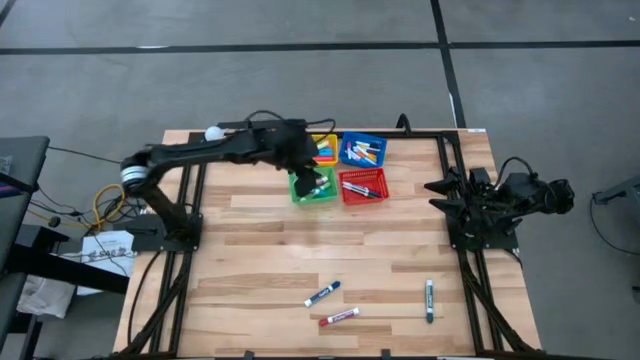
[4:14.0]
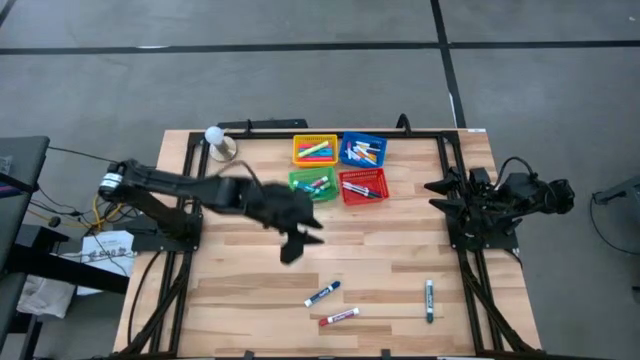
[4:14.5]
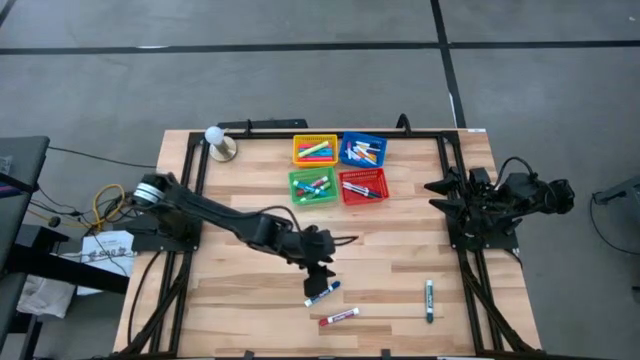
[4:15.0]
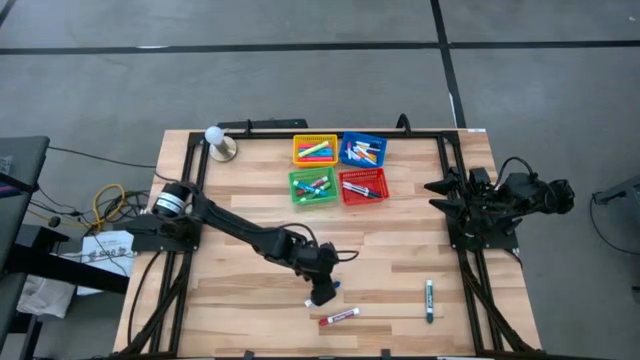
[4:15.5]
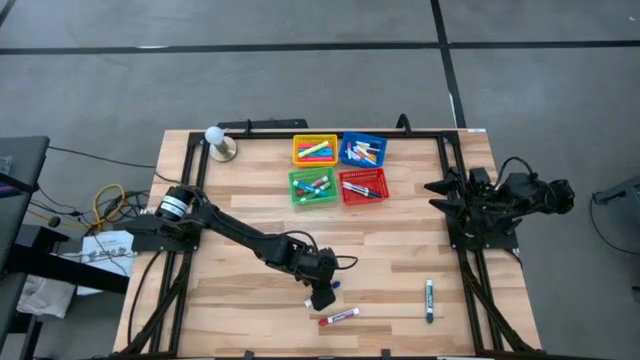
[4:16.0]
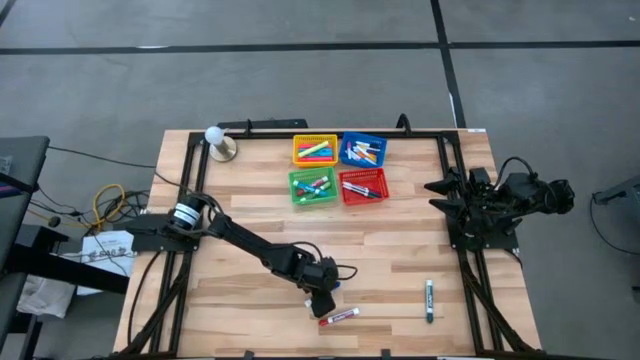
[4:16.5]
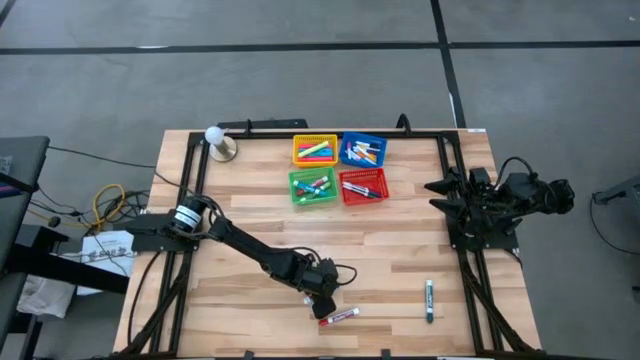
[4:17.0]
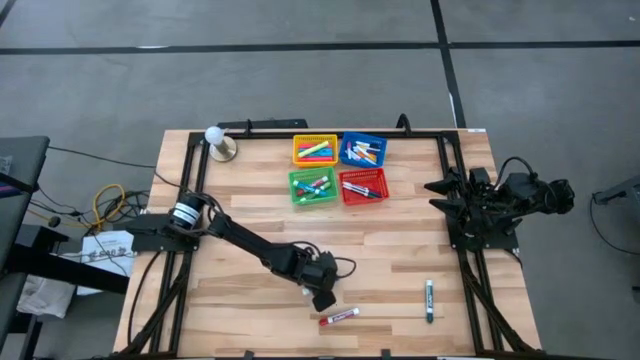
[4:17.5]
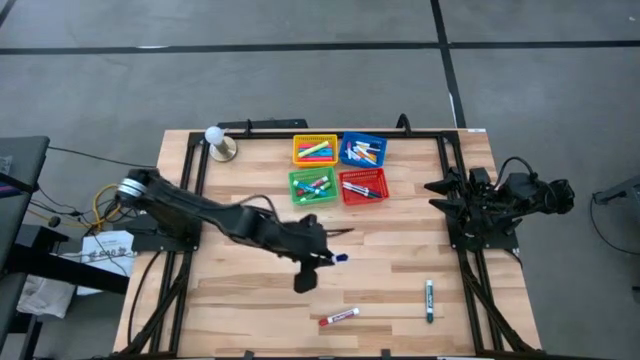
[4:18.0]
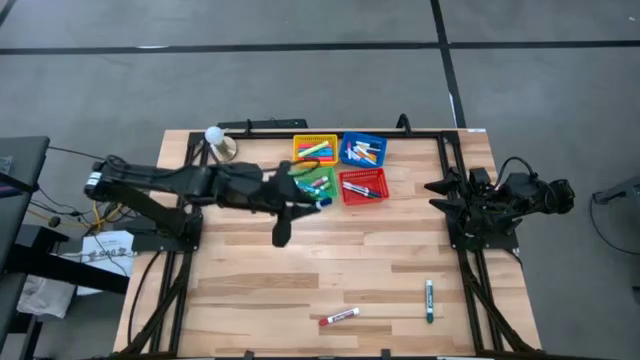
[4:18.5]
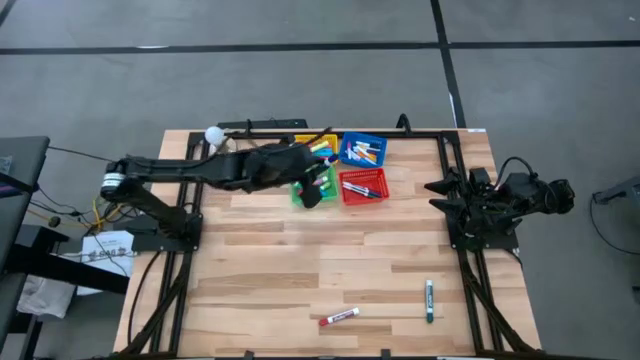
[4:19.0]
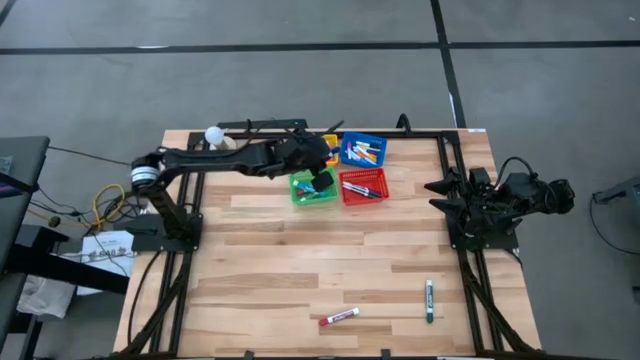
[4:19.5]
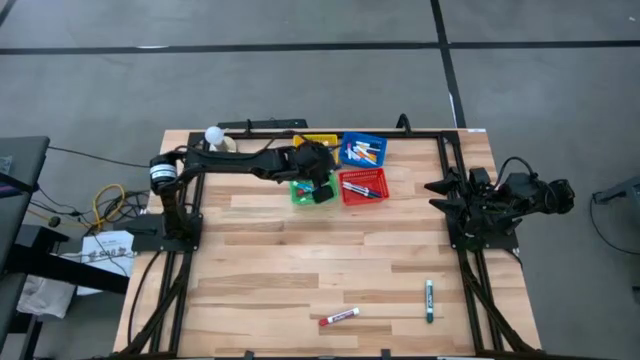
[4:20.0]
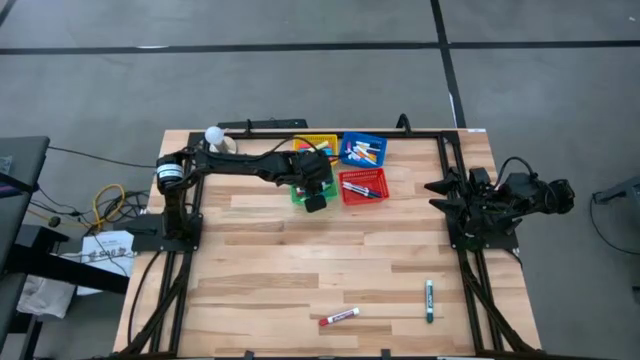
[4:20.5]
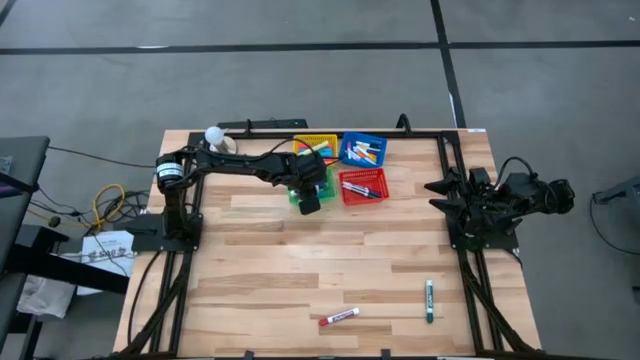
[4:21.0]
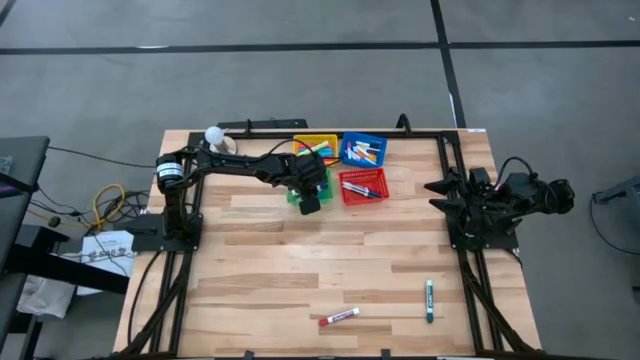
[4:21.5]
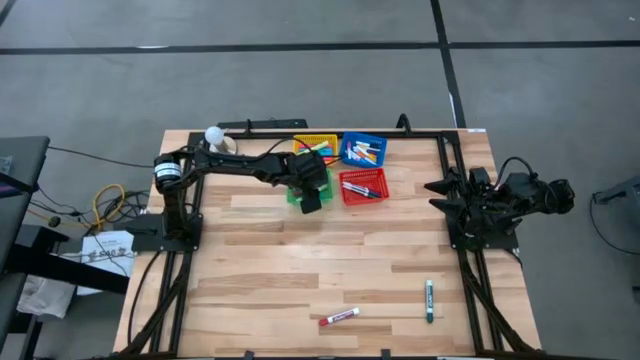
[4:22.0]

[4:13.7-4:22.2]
Task: Pick & Place Markers
Put the dark blue dry erase marker into the green bin

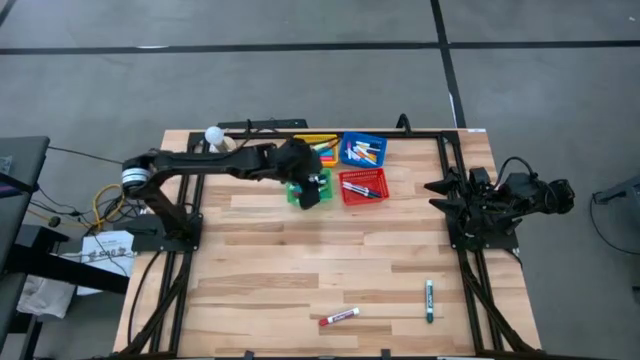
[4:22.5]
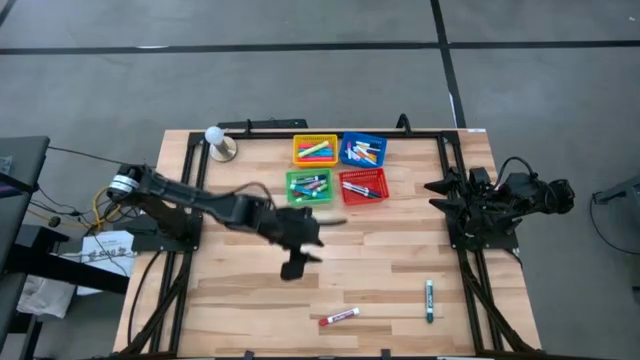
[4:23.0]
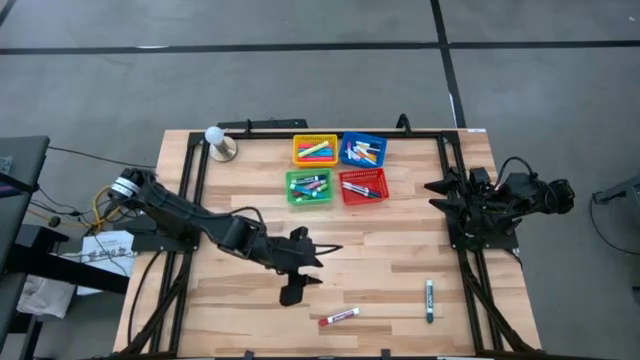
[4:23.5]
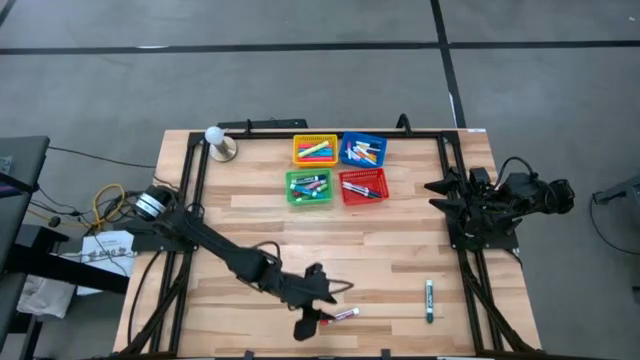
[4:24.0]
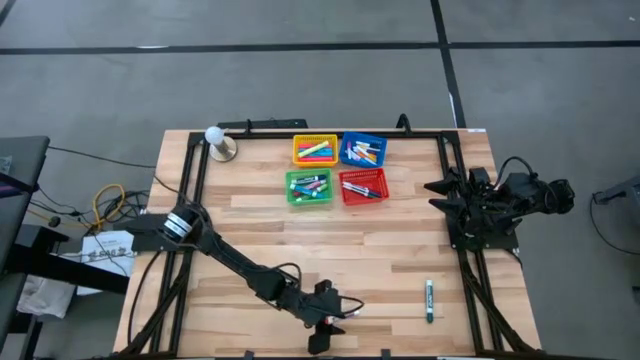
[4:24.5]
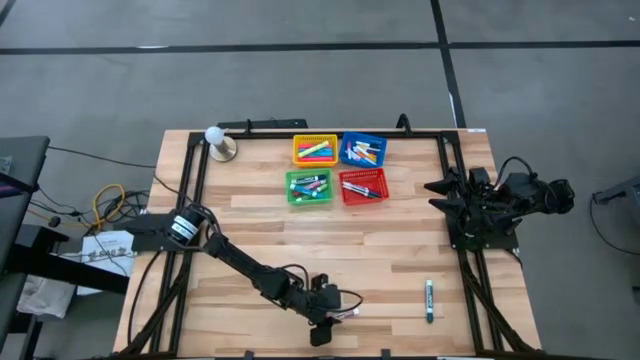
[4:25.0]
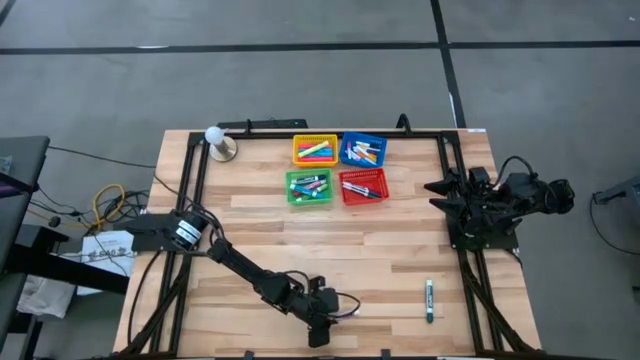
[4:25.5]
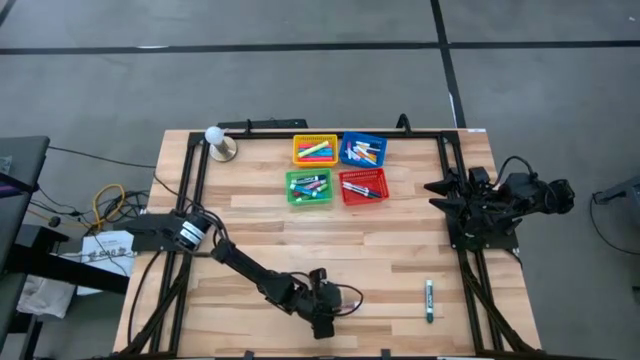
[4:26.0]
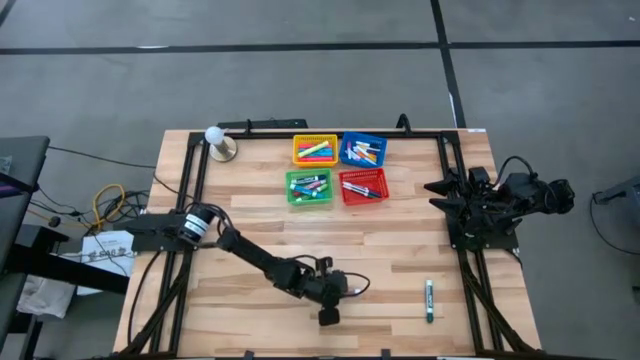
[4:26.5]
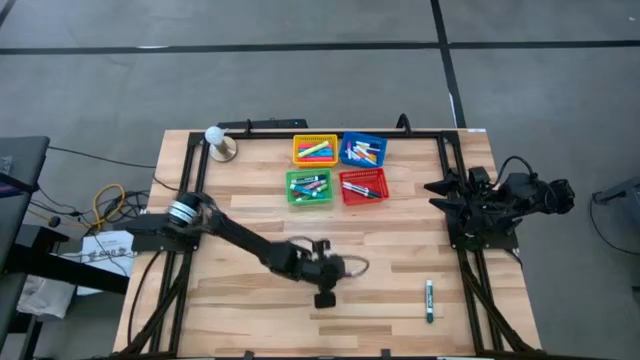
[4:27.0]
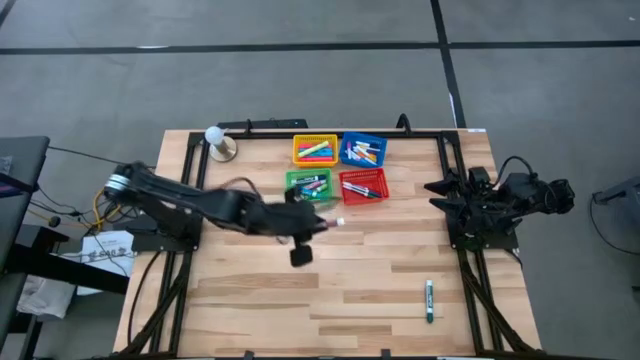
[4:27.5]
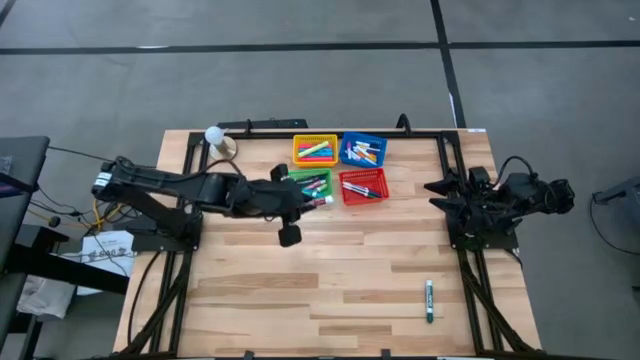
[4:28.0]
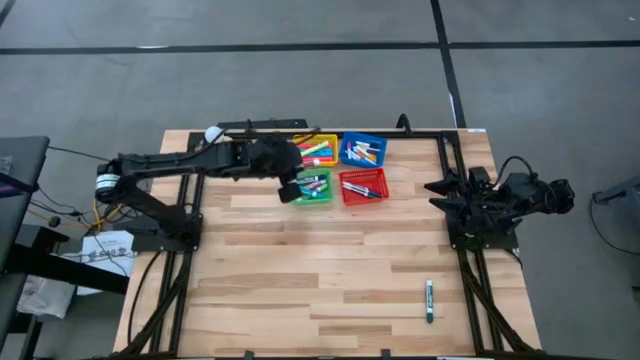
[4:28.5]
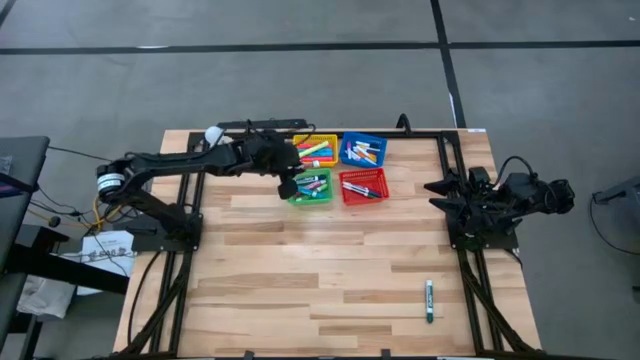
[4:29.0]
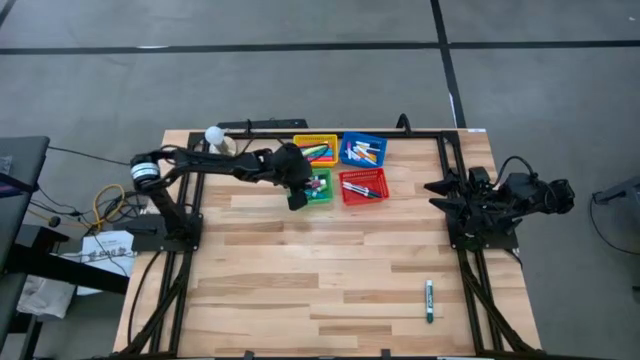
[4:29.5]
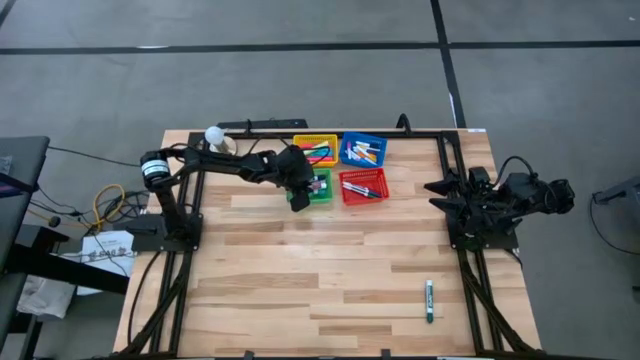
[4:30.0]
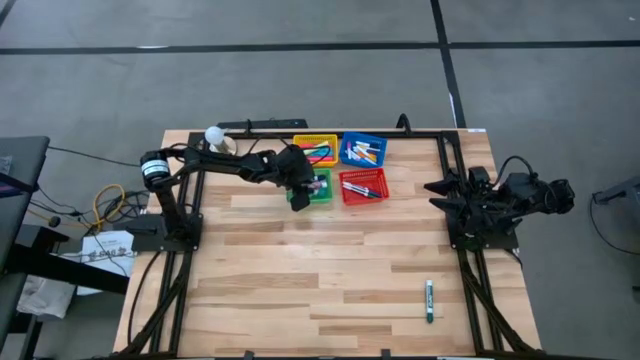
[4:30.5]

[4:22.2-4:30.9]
Put the red dry erase marker into the green bin

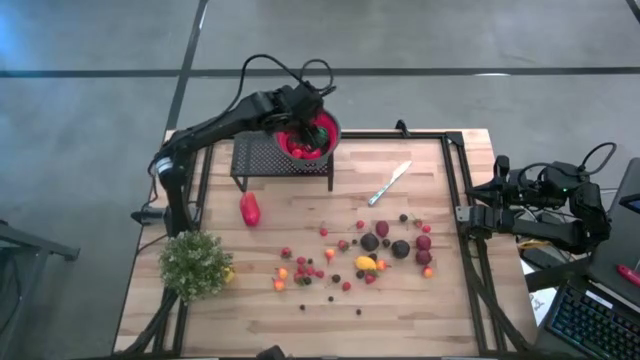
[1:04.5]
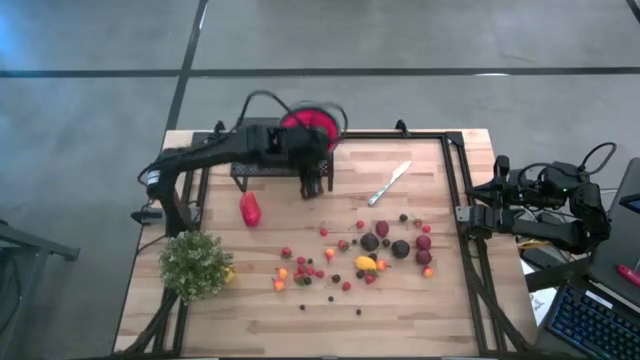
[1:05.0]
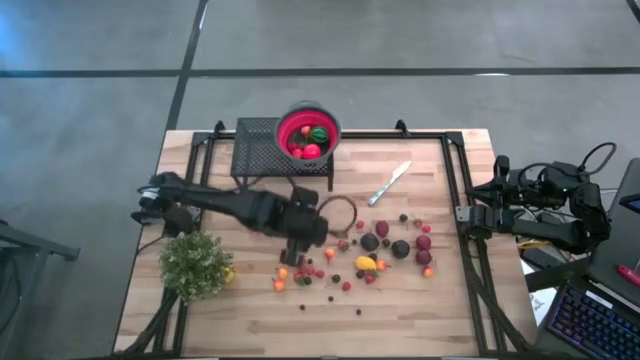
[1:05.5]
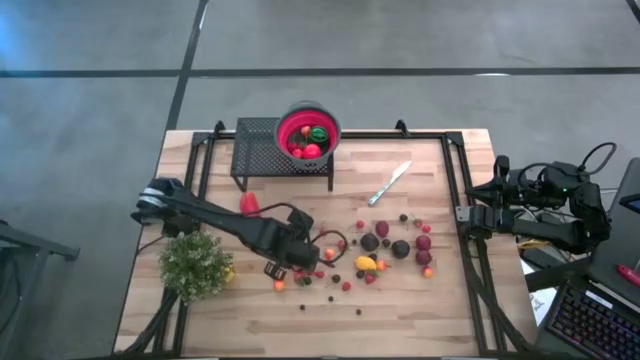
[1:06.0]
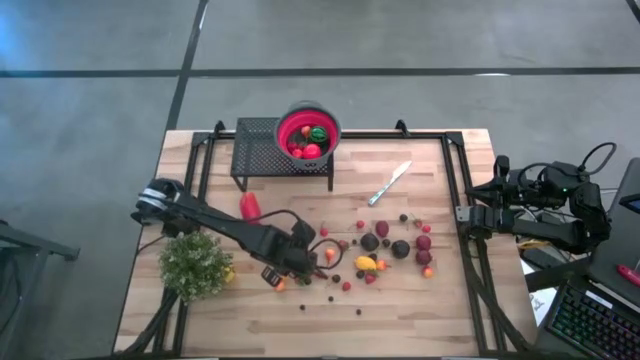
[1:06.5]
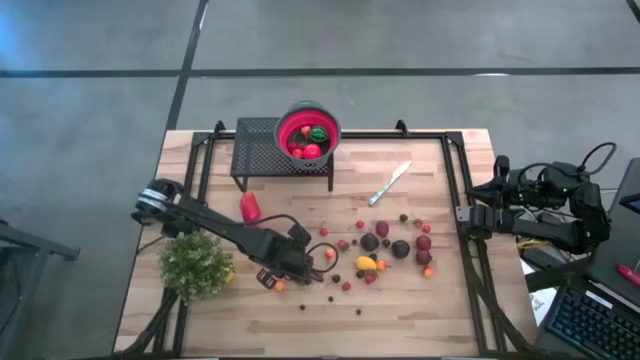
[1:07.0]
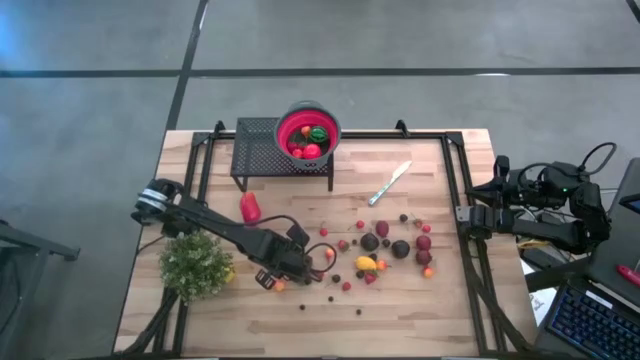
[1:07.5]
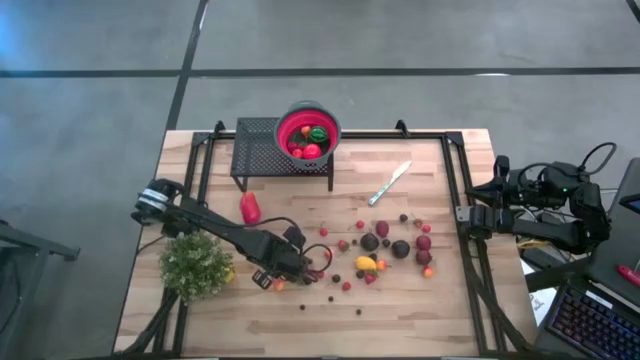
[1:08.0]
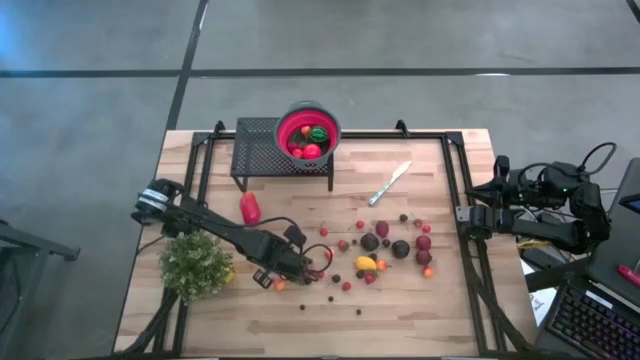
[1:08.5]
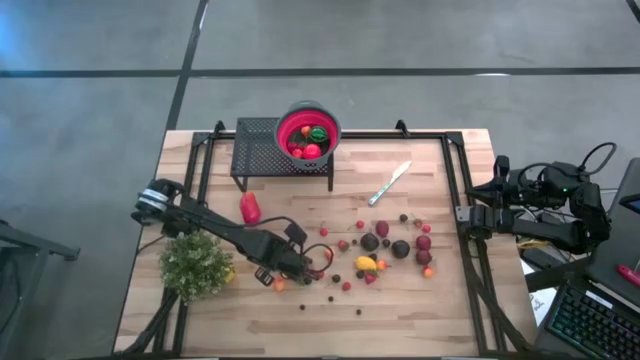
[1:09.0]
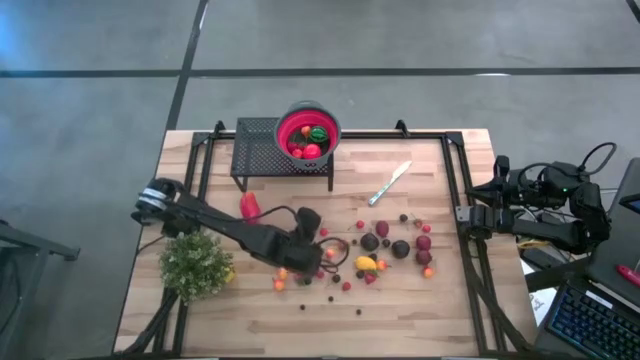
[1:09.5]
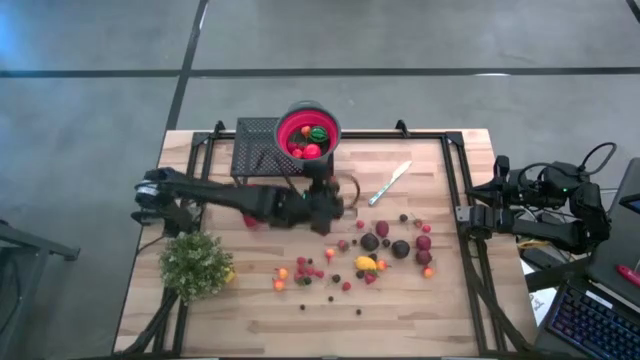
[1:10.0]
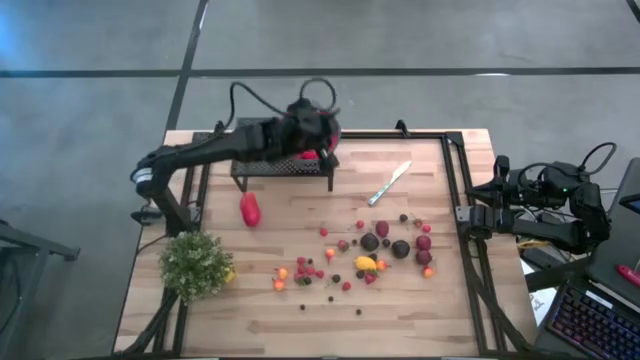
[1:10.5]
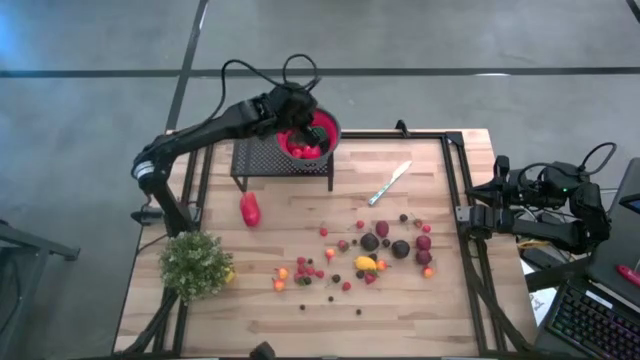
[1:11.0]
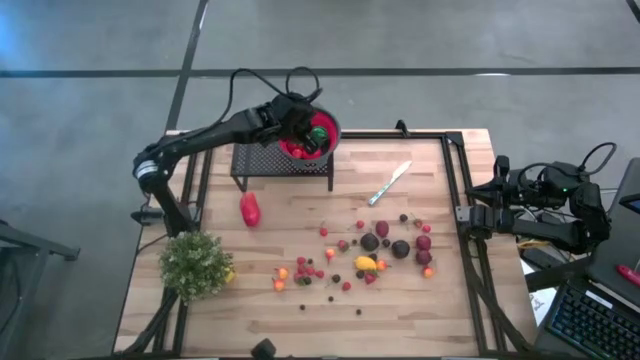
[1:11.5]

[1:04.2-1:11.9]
Task: Pick & Place Fruit
Put the red strawberry into the red gray strainer bowl on the shelf
